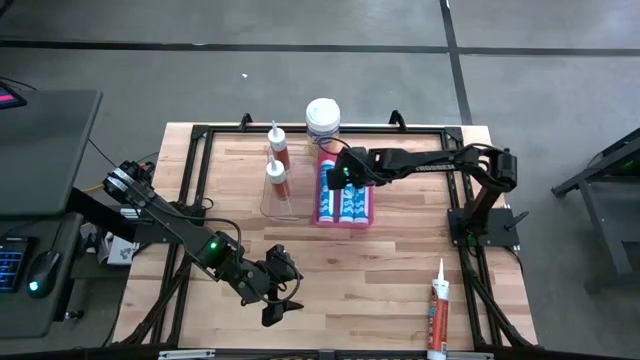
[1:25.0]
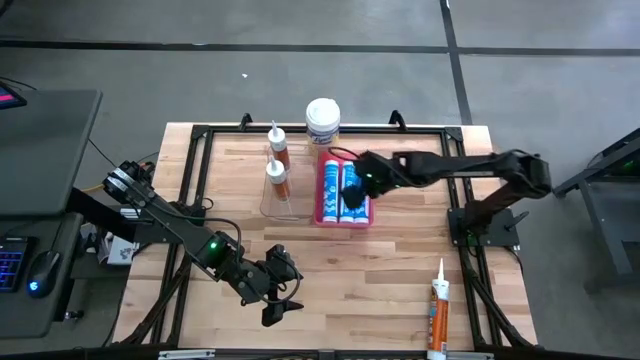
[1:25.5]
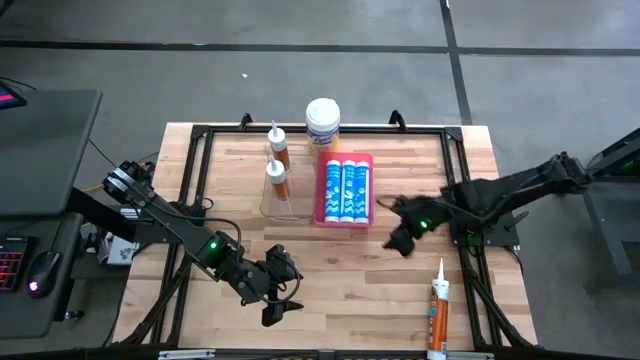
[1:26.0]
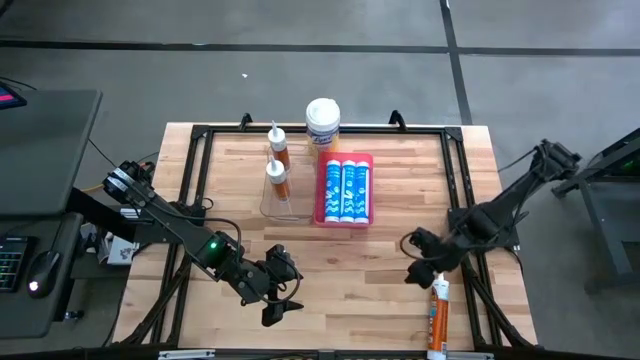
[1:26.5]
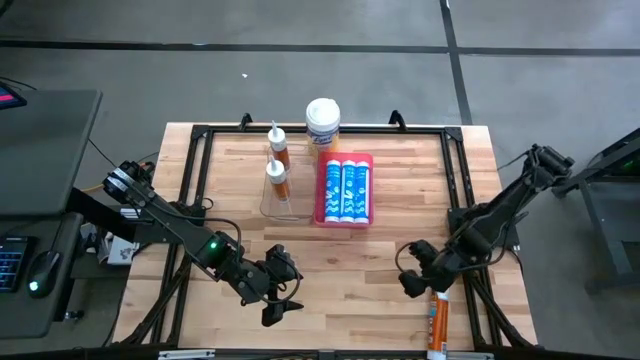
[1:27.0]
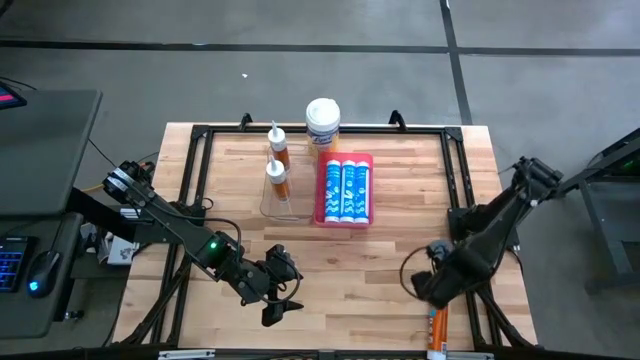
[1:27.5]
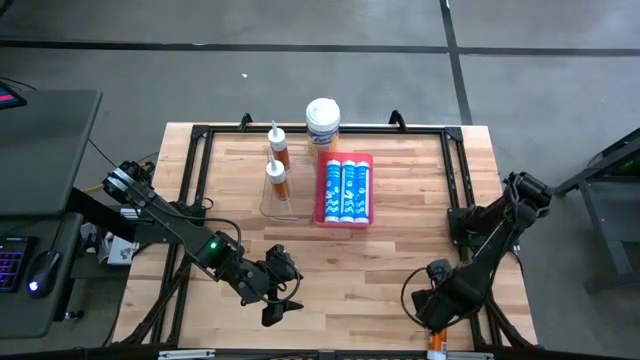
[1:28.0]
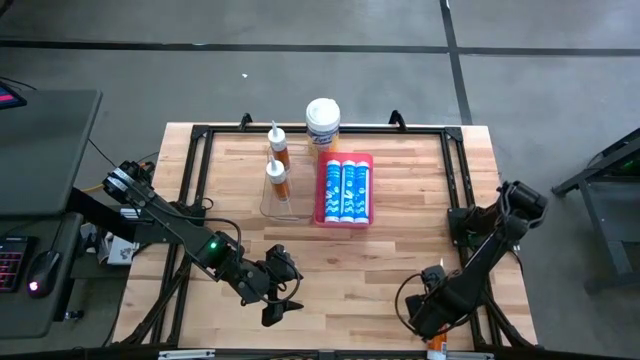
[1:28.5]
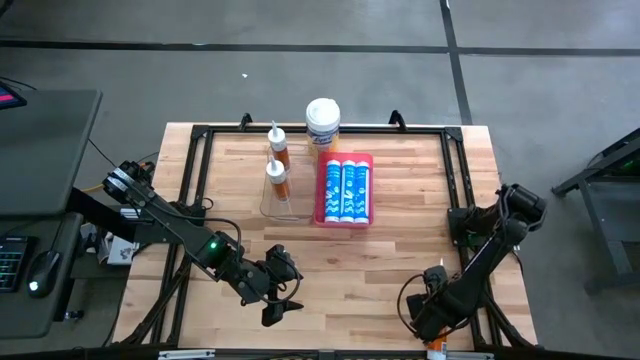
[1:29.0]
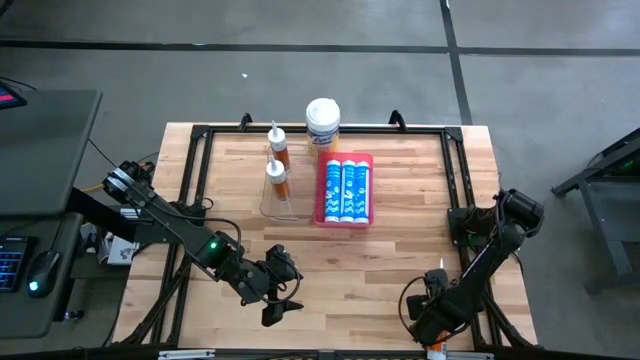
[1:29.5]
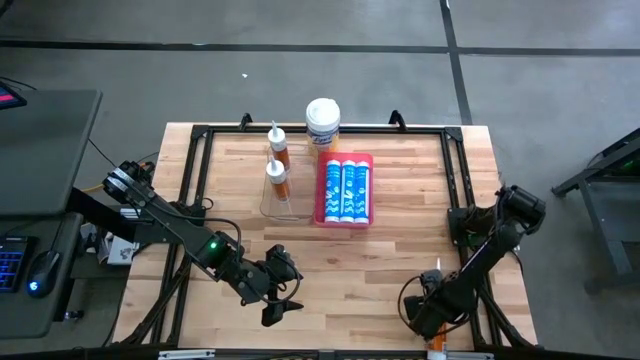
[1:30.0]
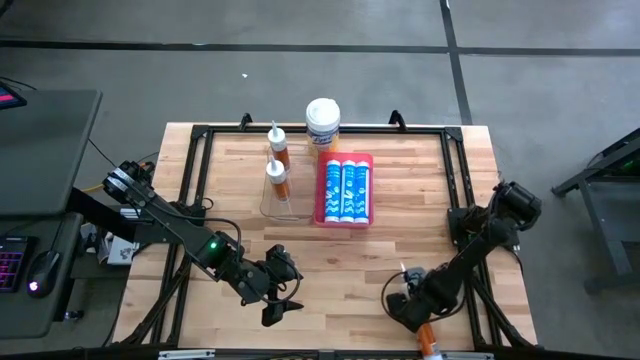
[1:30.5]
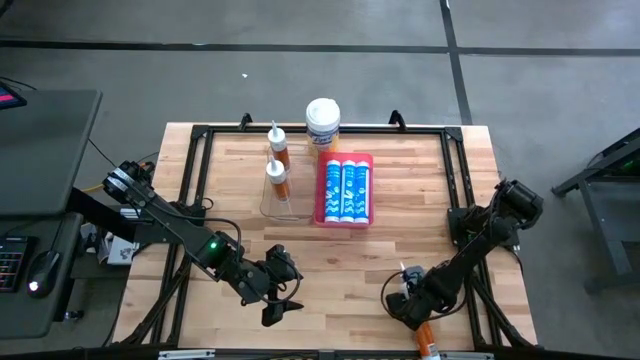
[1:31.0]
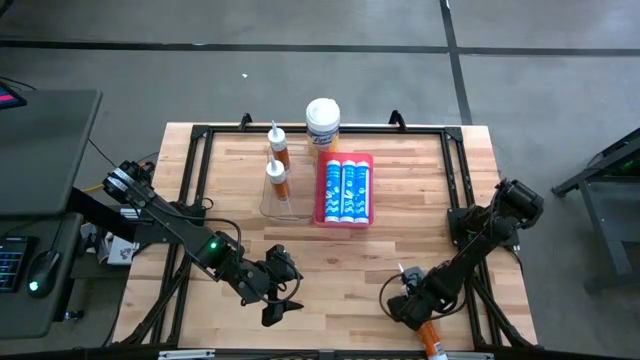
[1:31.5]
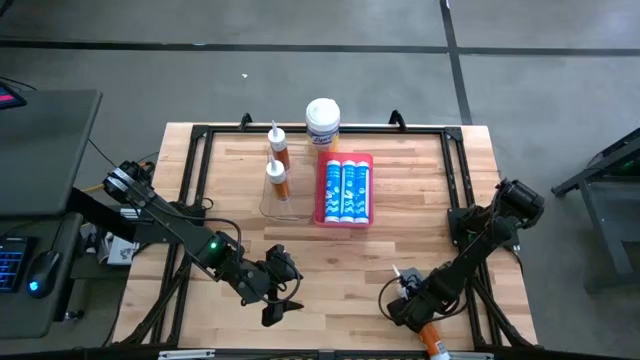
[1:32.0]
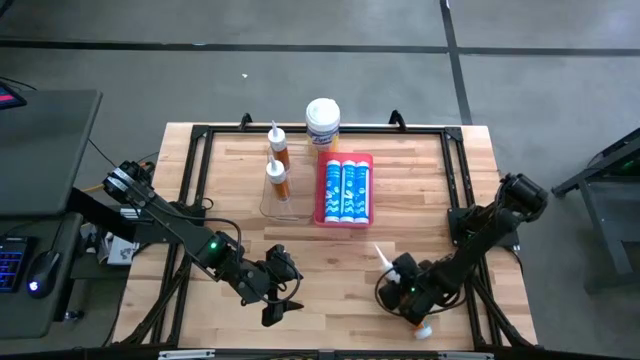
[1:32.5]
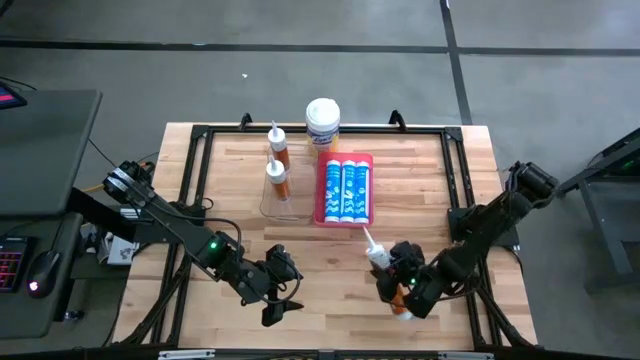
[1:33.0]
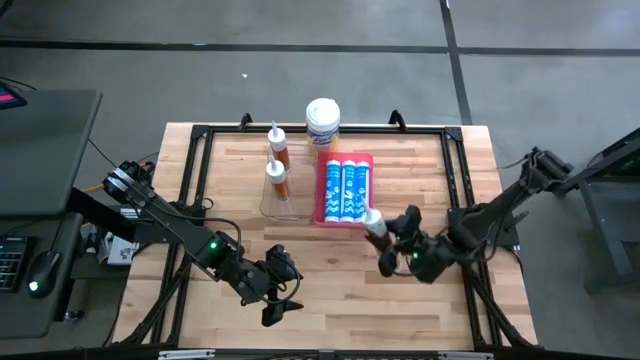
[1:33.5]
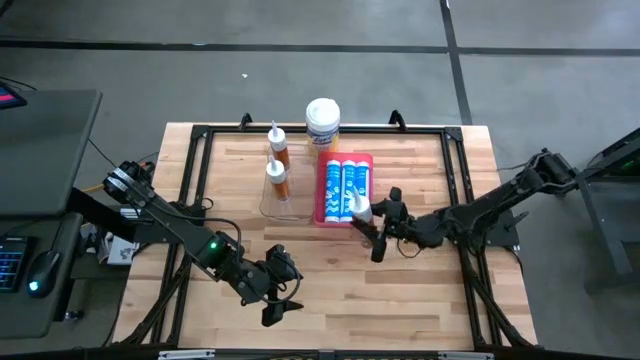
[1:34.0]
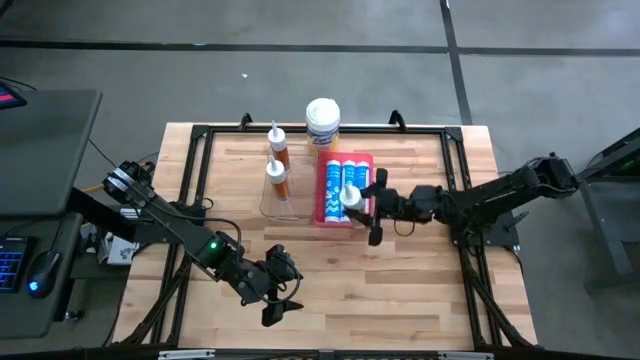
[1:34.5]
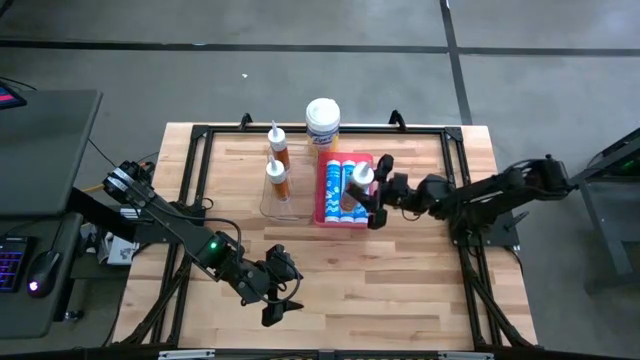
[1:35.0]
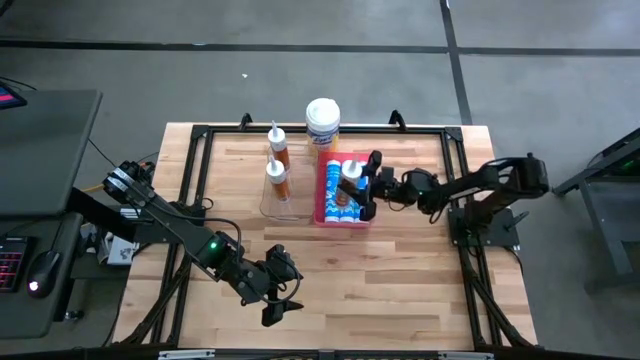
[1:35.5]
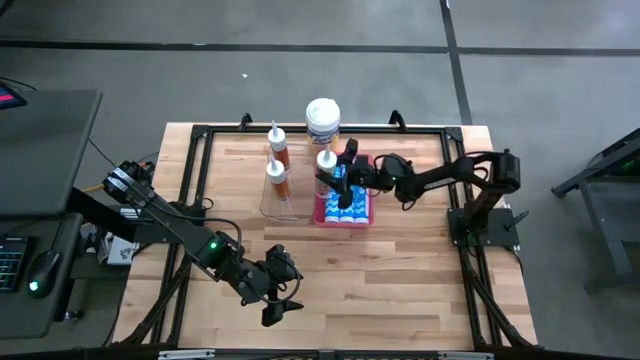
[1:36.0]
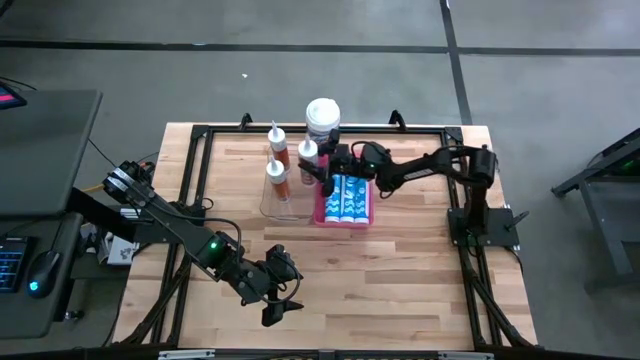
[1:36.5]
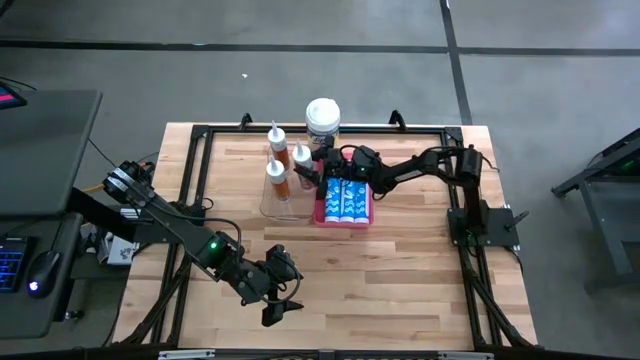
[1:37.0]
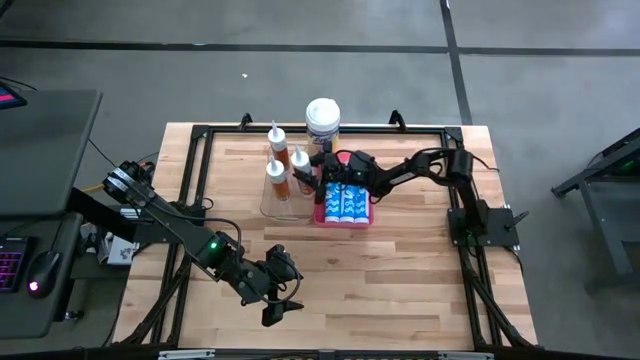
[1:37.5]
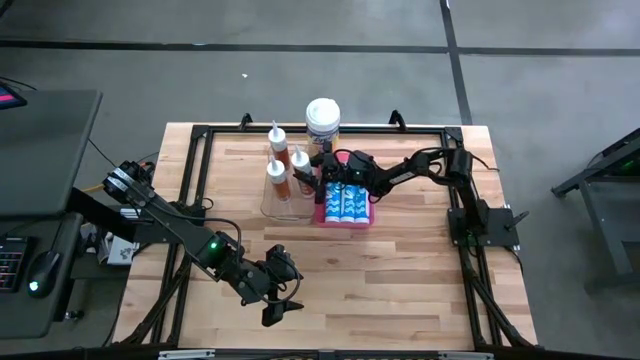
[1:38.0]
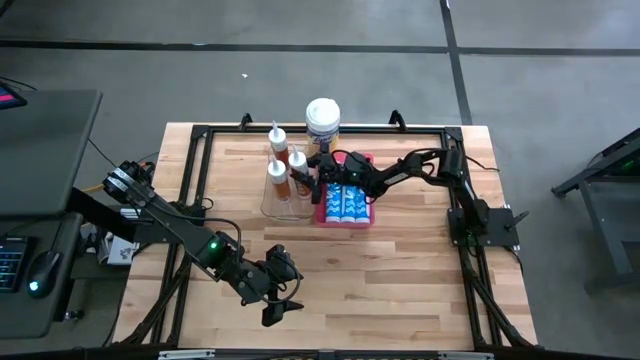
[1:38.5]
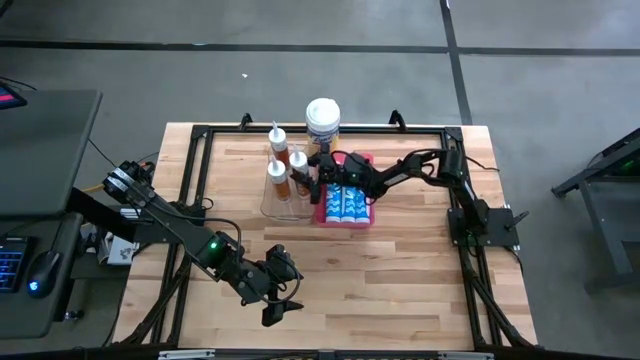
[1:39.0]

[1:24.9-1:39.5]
Task: Pick & place silicon tubes, Sealant and Lysol wipes
Put the orange sealant into the transparent container

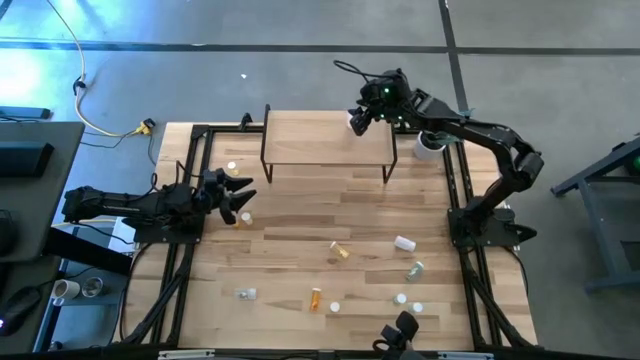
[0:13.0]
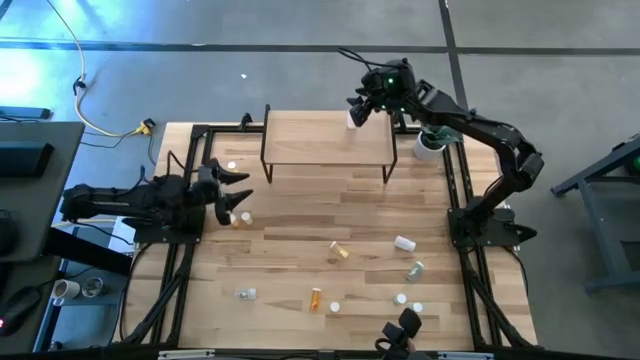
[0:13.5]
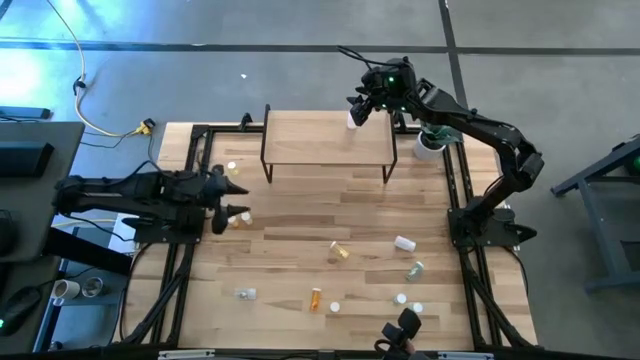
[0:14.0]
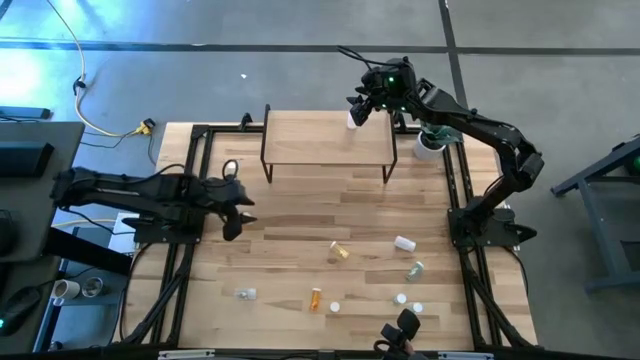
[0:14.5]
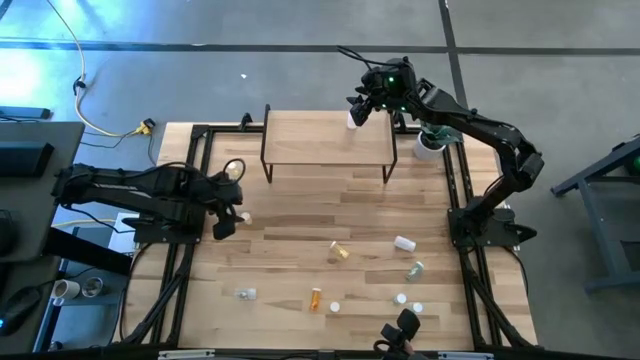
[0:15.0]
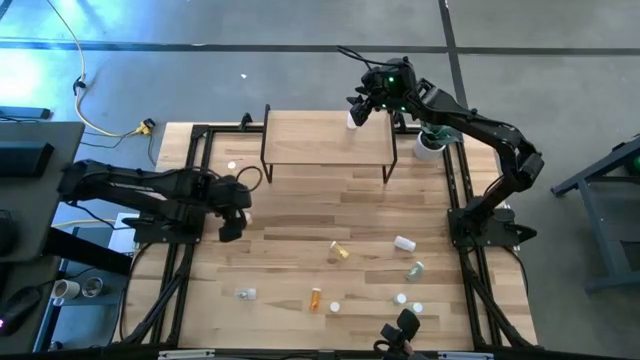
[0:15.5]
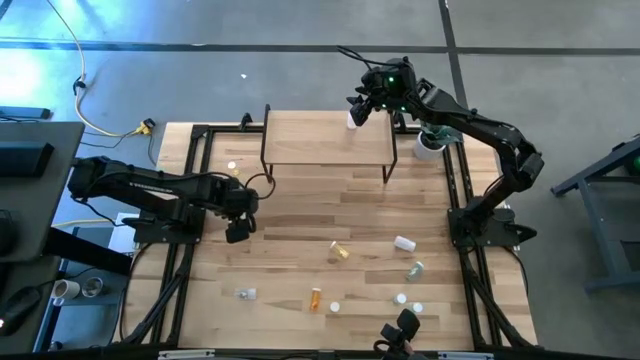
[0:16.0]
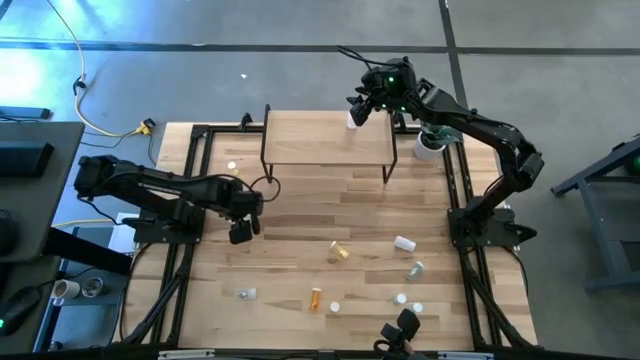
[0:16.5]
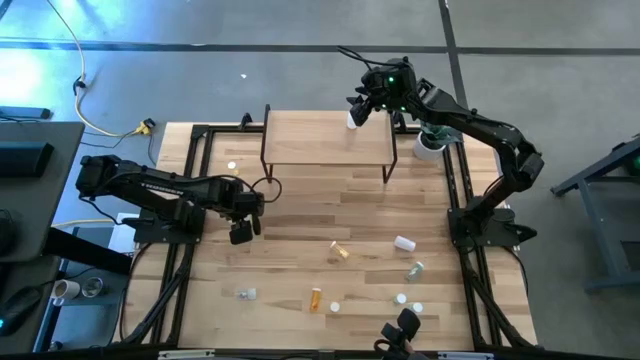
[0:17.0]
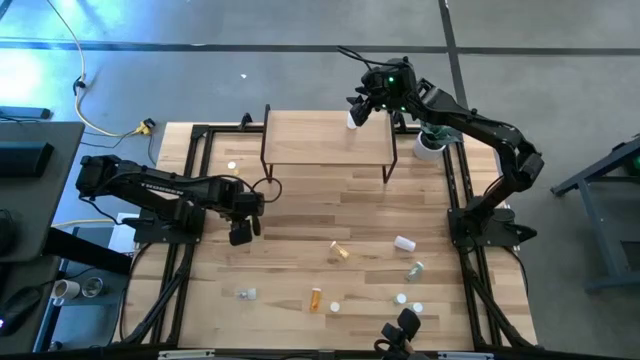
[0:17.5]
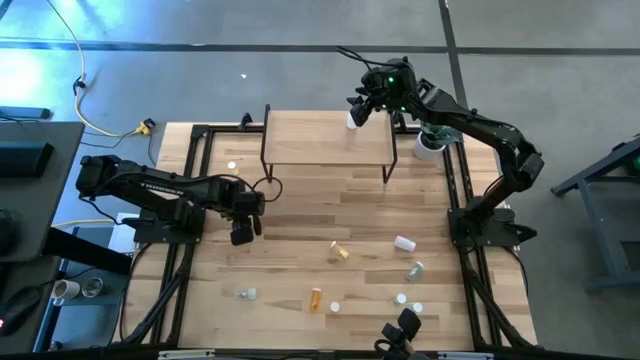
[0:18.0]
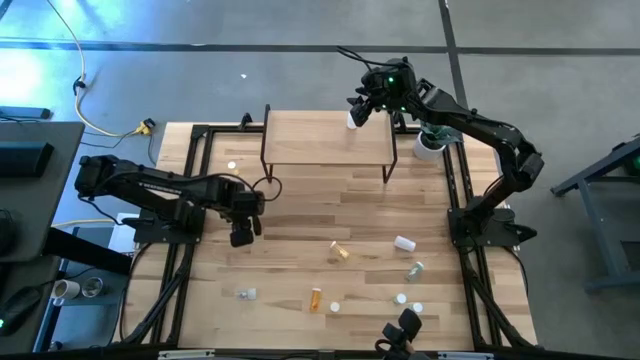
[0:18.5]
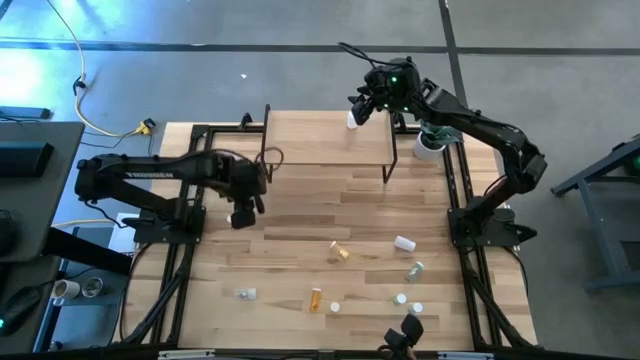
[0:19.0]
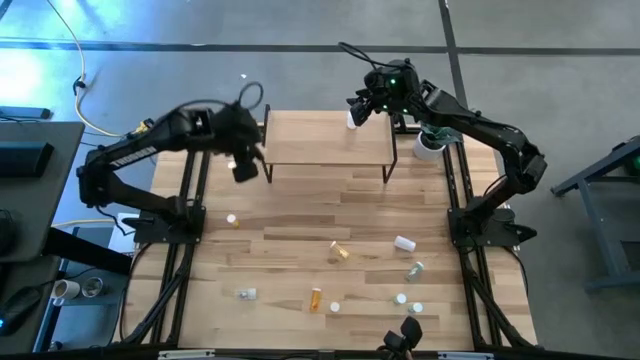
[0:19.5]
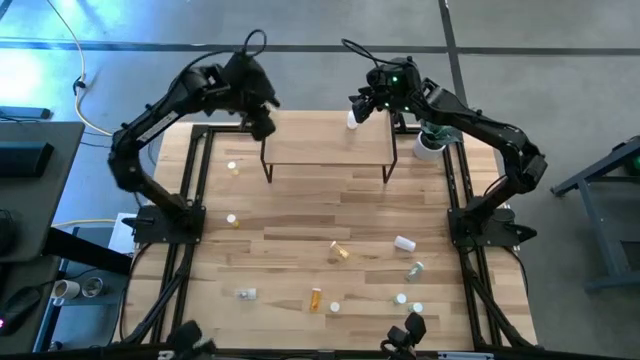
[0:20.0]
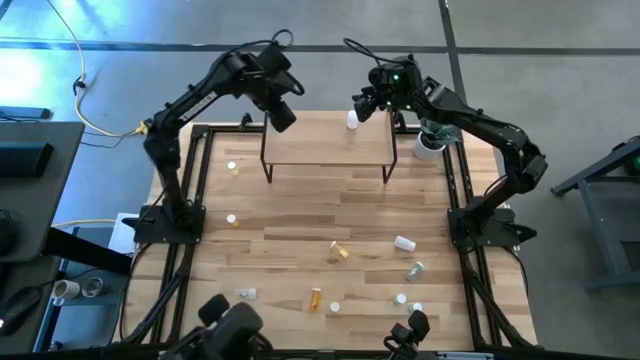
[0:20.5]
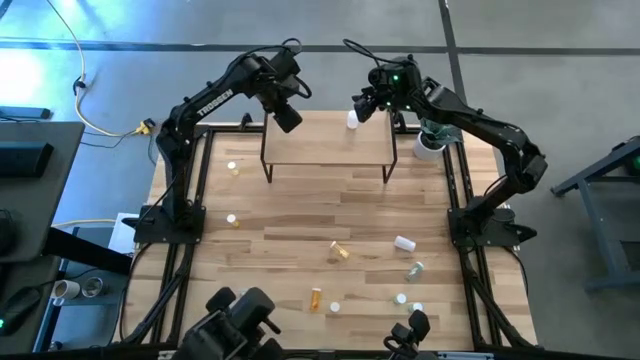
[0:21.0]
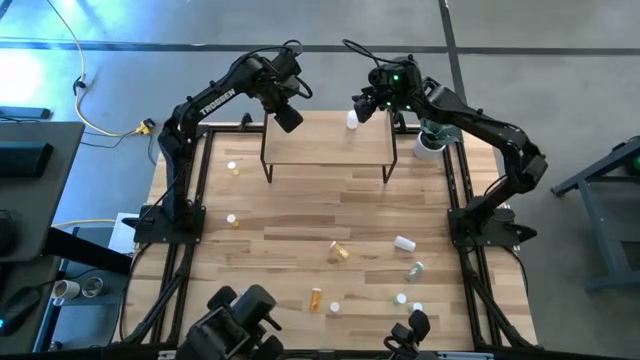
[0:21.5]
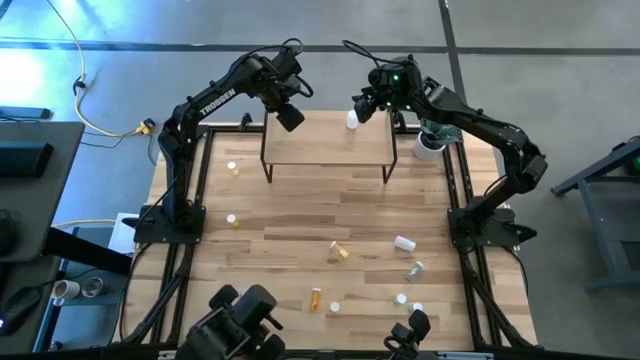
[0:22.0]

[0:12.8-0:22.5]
Task: Pick and place medicine bottles onto shelf by color
Put the middle left yellow pill bottle on the shelf
